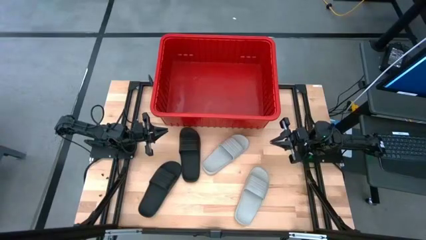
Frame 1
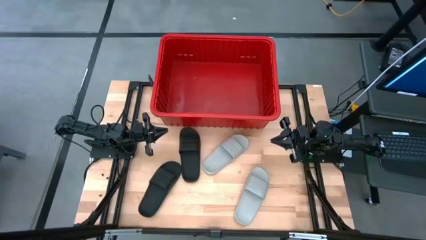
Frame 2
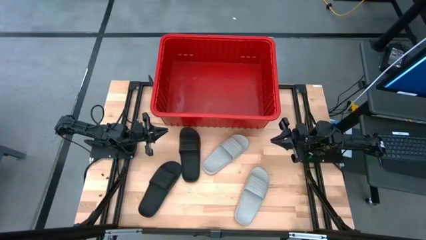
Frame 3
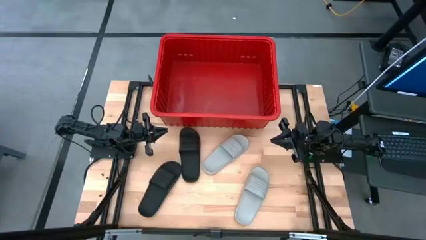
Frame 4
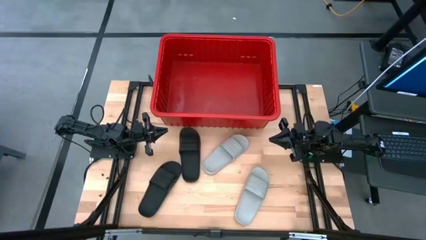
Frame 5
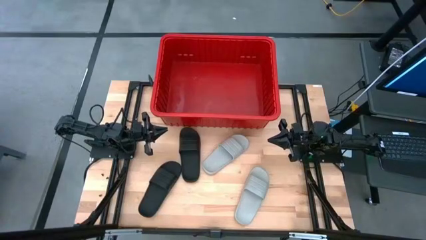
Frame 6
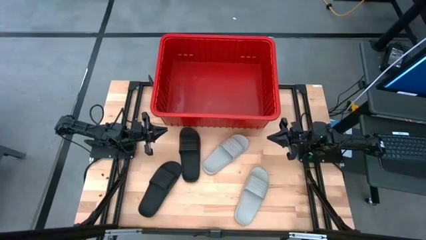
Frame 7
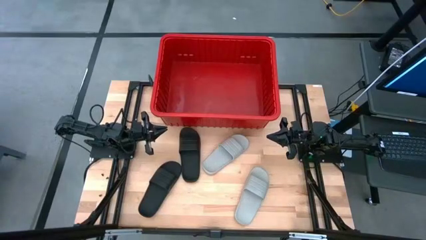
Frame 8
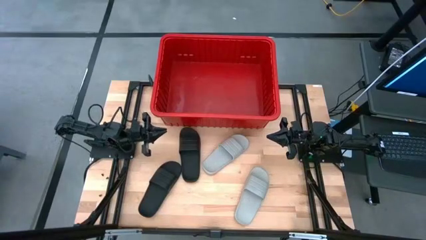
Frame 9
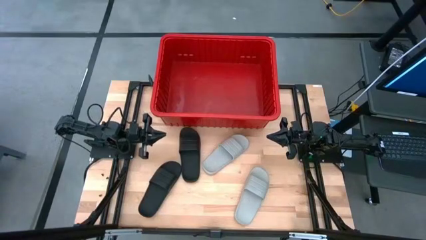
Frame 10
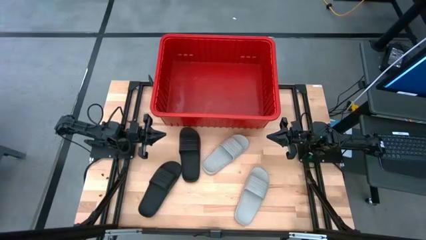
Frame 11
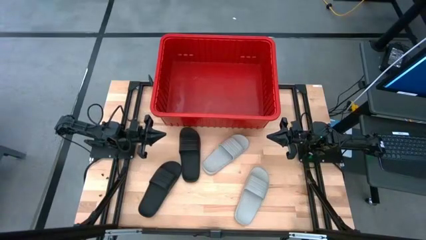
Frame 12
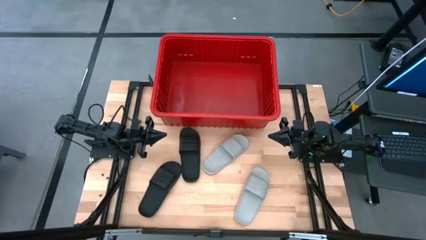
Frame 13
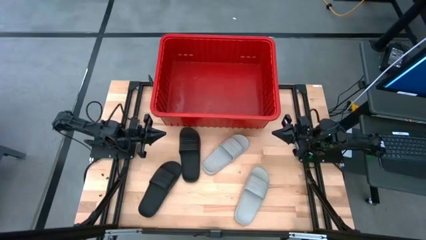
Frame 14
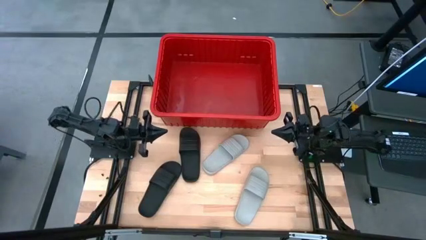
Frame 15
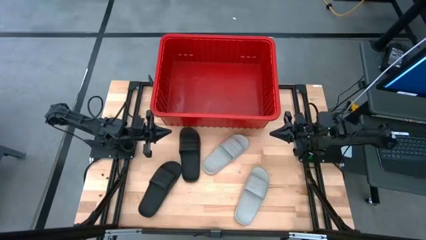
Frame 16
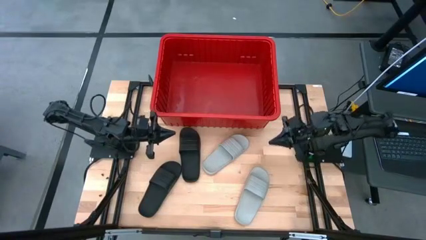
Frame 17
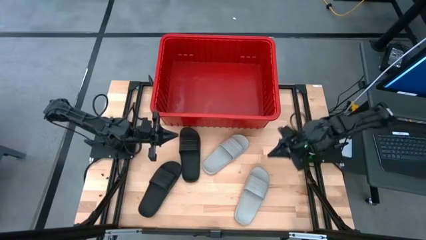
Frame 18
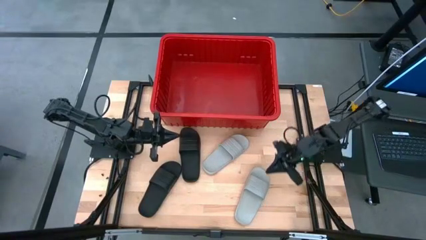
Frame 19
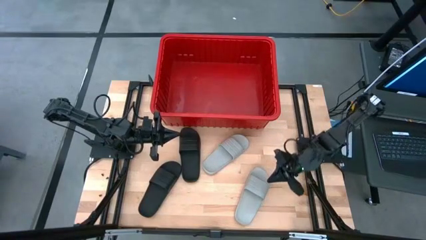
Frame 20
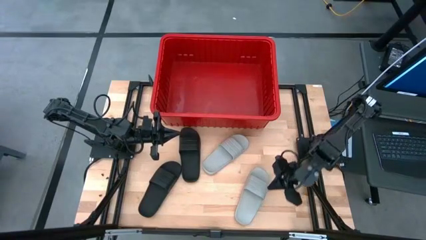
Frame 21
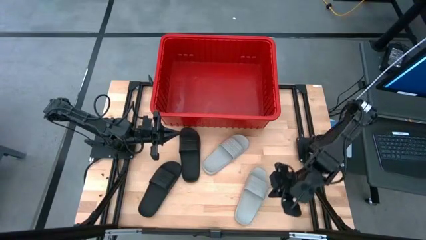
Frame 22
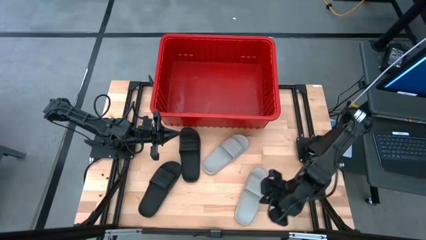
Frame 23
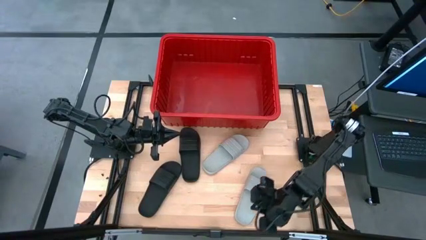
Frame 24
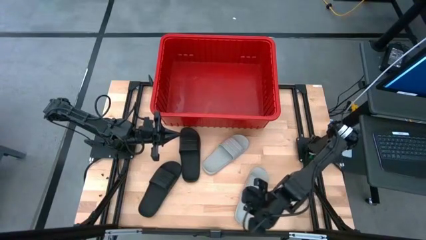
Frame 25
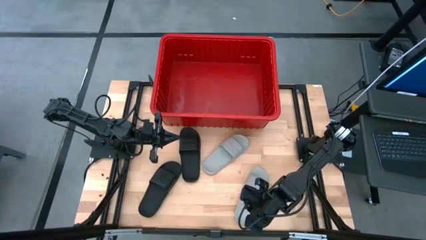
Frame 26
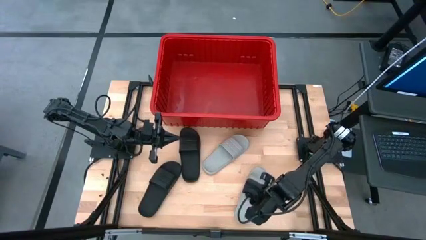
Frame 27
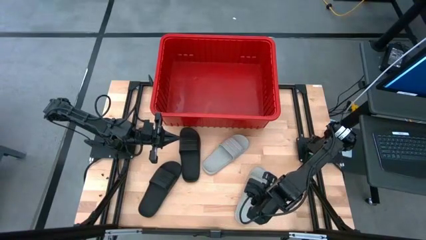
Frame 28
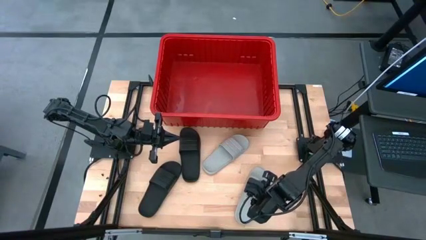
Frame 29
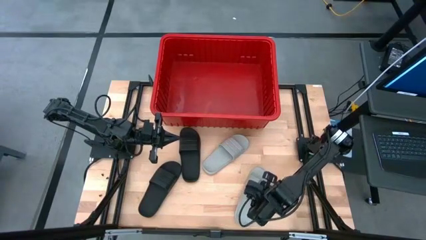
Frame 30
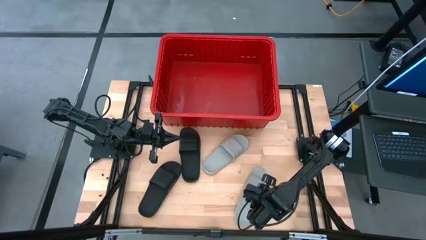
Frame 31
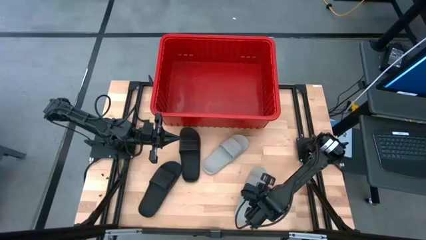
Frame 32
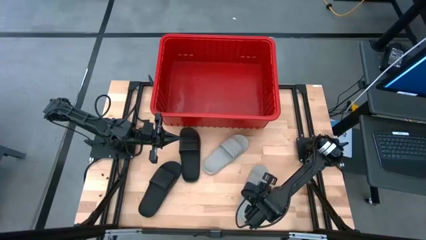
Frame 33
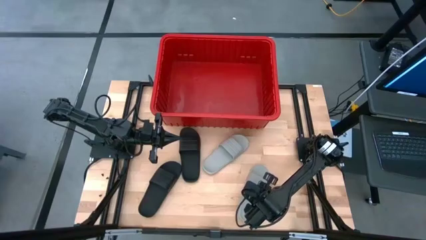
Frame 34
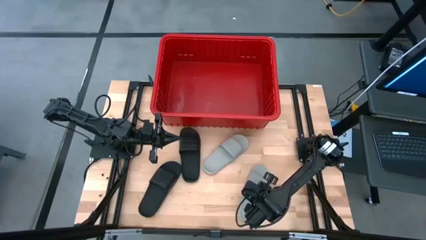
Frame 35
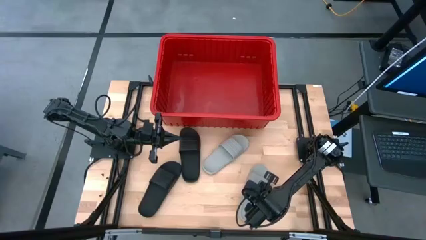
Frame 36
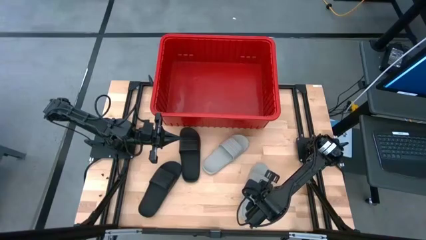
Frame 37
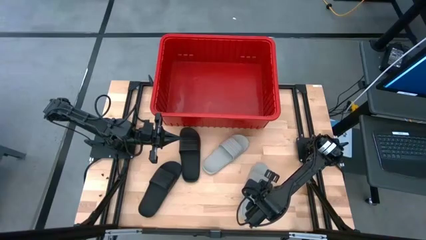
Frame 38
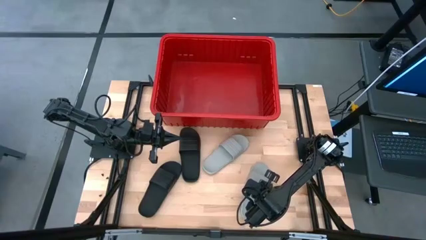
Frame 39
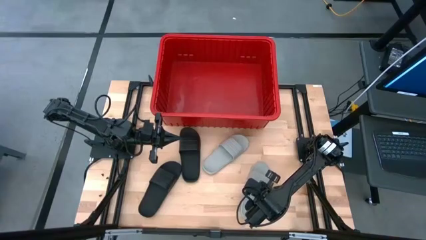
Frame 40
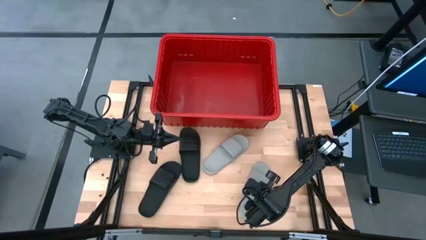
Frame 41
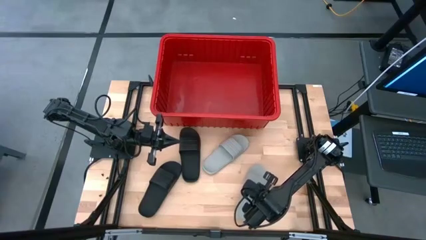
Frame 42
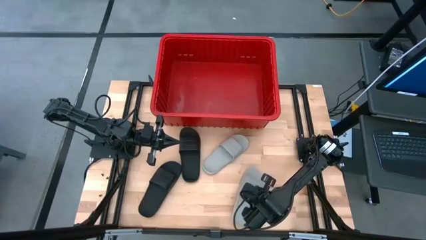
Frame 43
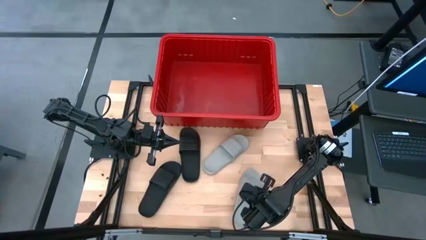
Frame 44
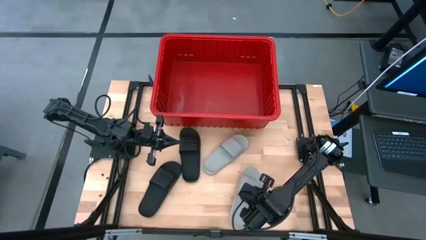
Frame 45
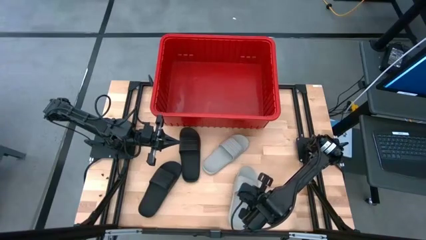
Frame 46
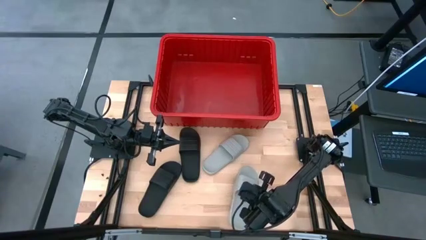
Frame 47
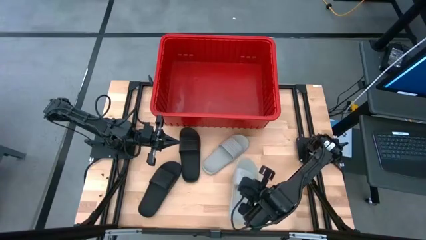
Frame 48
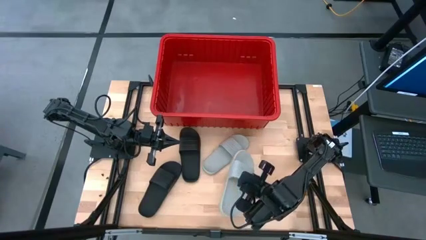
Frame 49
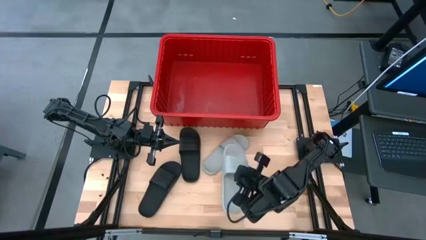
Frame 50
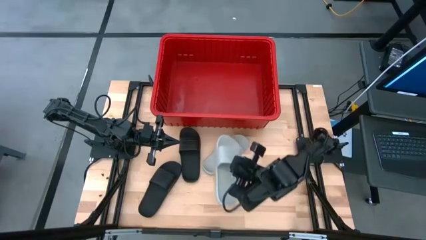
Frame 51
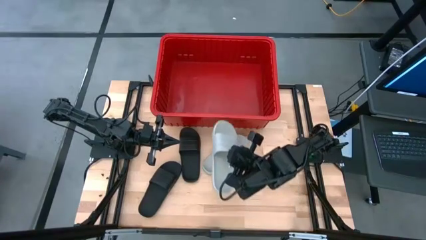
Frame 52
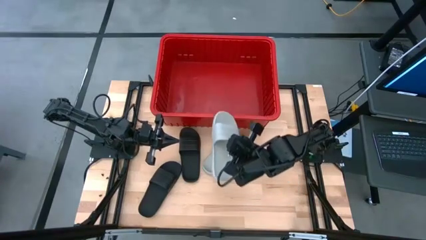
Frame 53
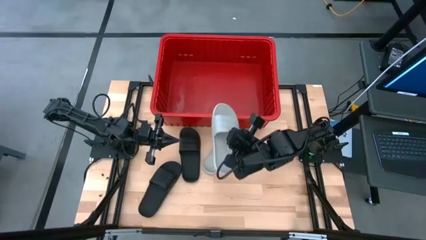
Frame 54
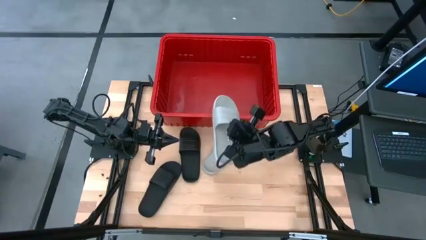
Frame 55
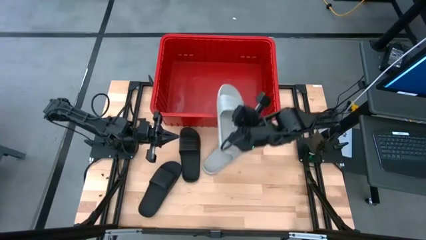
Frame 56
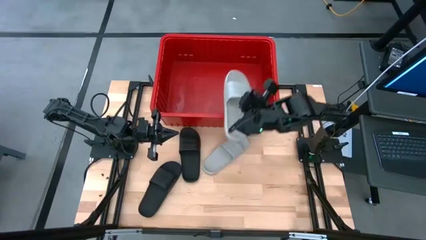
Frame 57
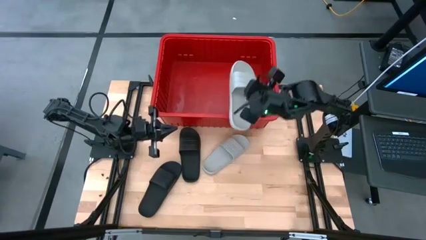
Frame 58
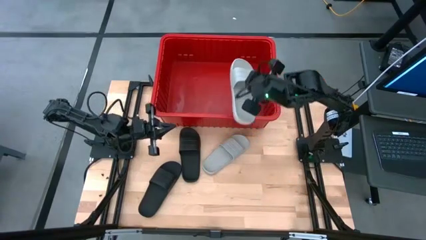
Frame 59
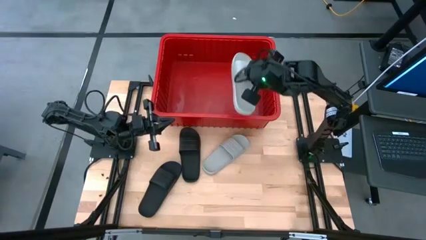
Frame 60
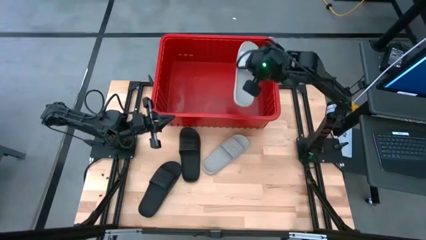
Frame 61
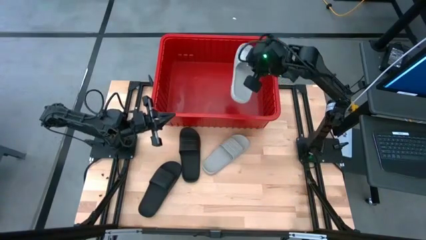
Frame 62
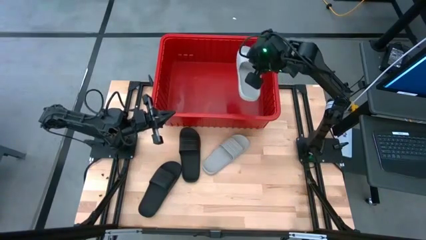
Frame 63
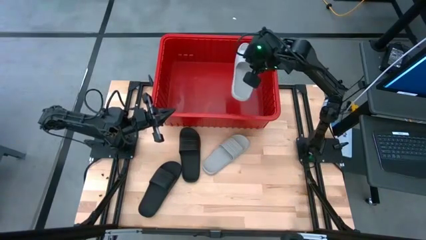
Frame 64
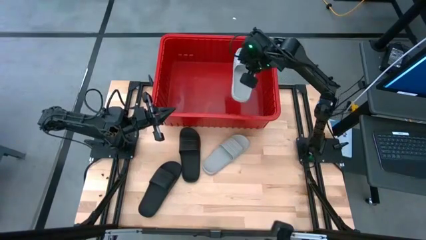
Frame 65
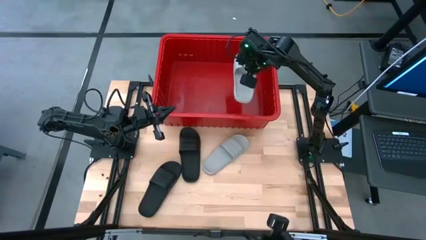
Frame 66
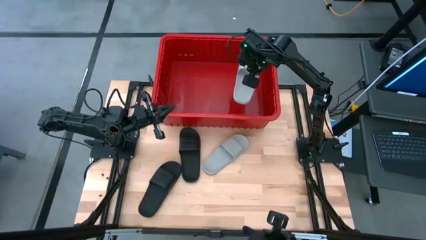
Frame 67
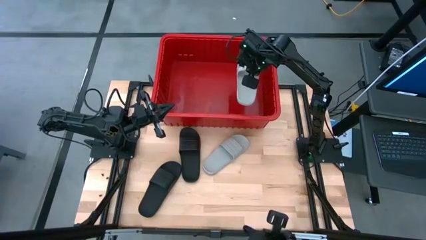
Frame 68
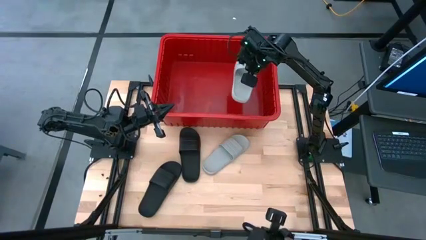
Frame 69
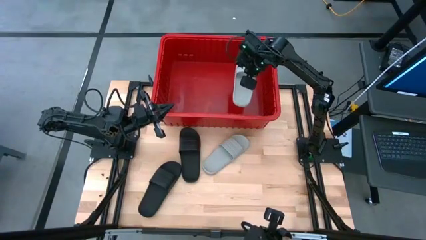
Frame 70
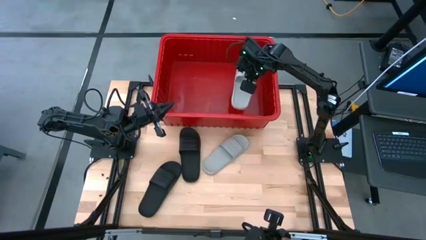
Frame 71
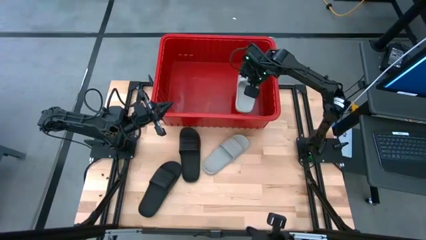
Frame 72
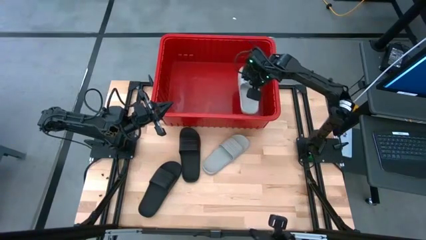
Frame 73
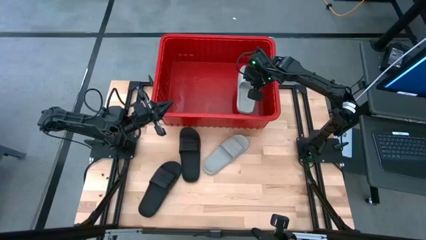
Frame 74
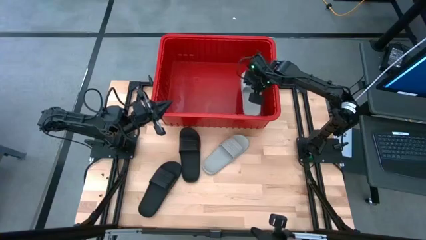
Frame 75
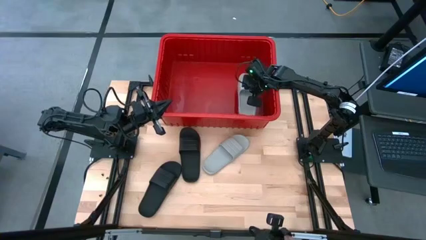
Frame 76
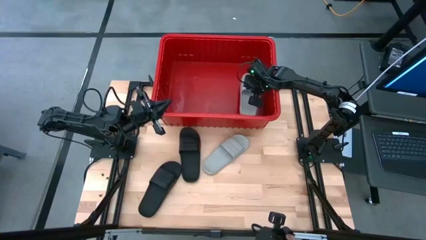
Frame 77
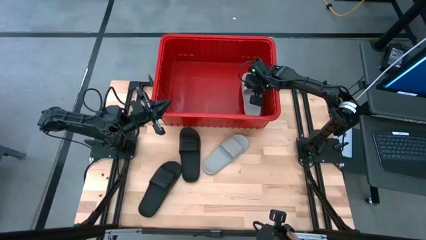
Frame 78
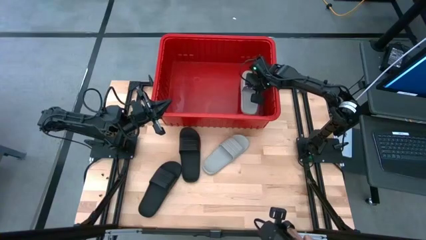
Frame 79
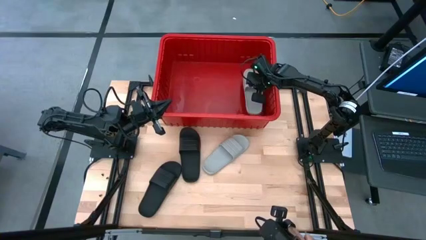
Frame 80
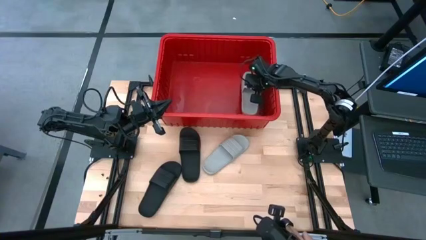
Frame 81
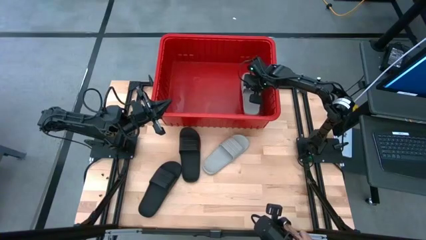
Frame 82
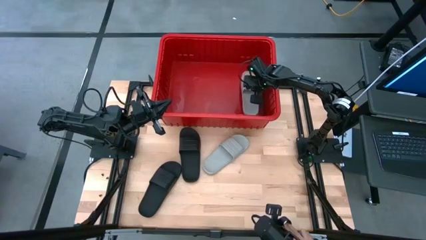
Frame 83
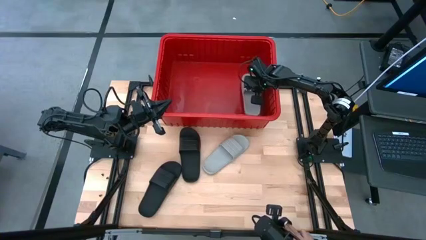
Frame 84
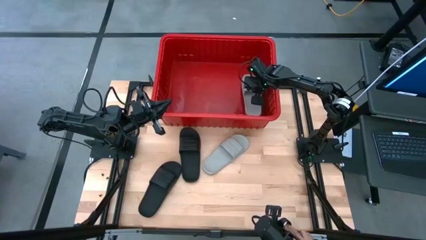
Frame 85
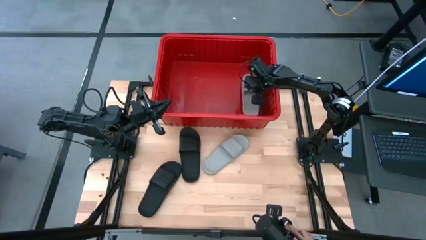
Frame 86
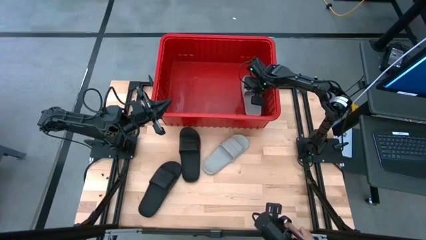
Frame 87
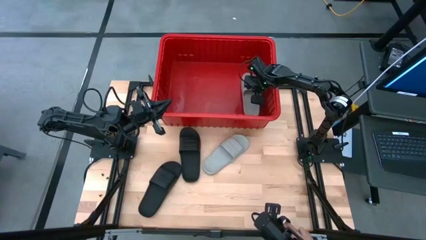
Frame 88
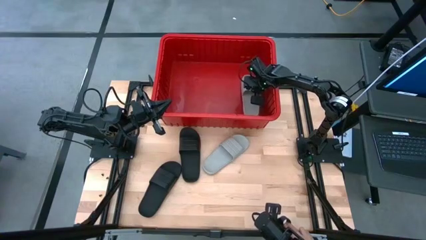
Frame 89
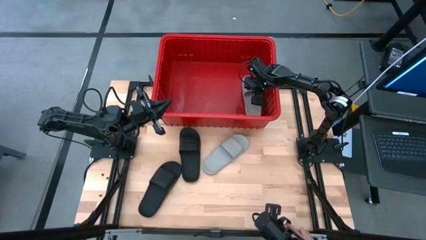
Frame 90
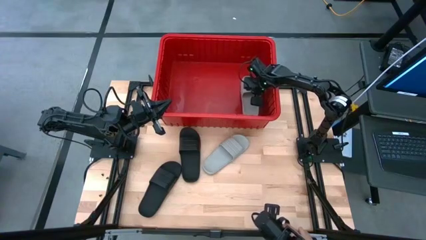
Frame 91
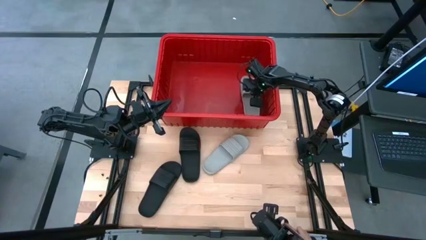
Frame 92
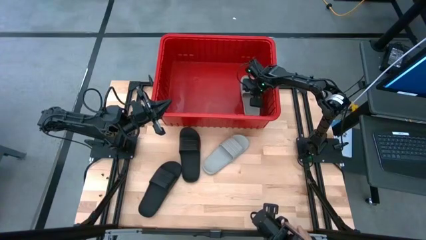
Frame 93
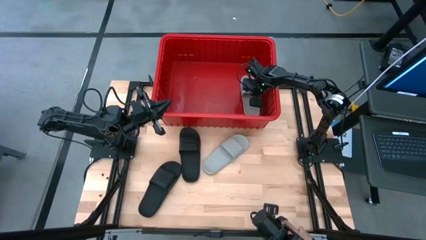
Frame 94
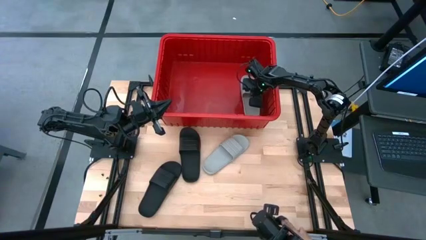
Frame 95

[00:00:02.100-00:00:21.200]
Task: Pick and place slides into bin
Put the bottom gray slide into the red bin
